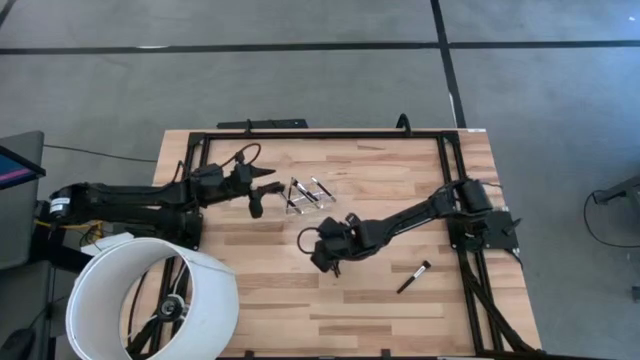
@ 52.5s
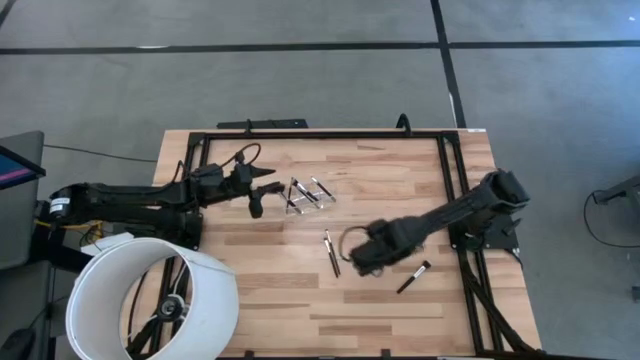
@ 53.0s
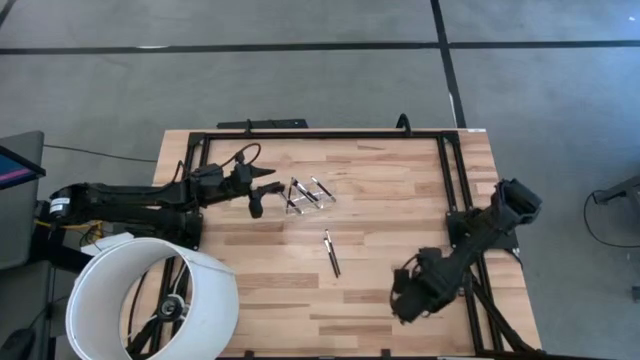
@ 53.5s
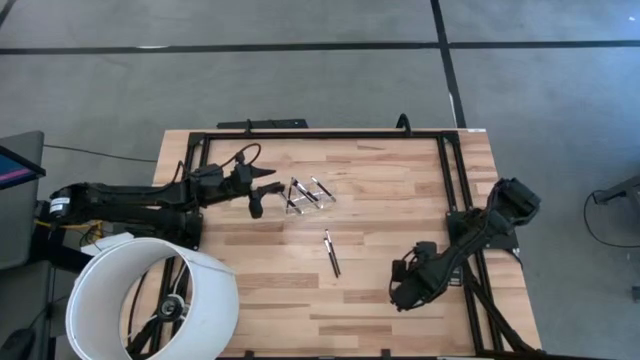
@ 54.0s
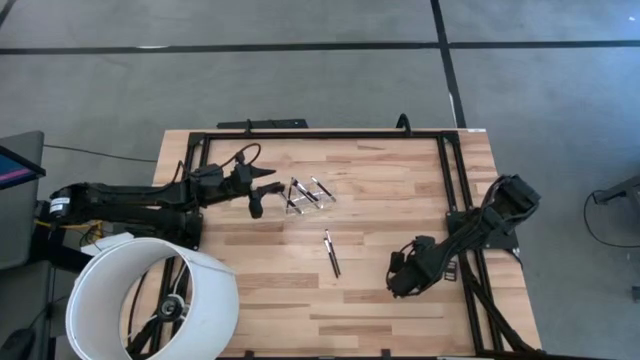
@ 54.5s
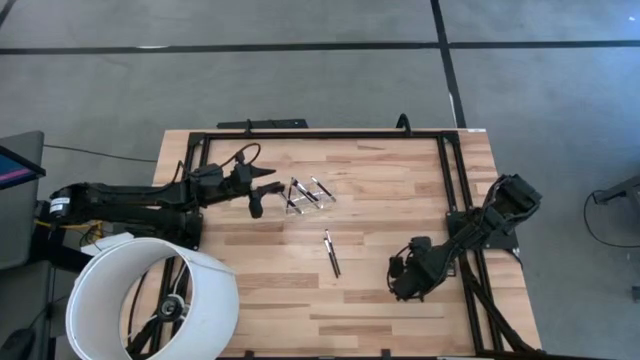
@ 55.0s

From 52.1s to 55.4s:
Task: Put items in baskets/containers
Put the black powder brush into the transparent organizer

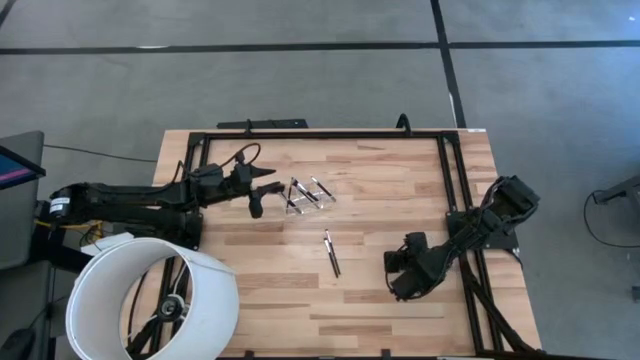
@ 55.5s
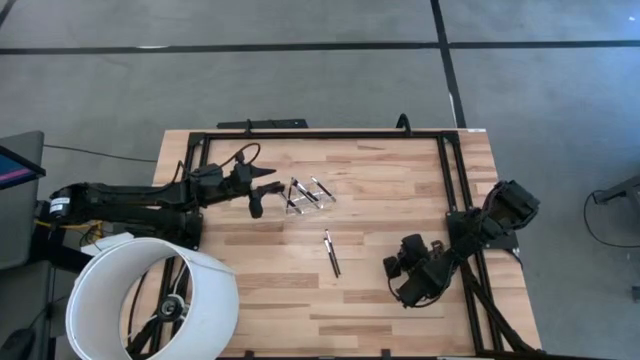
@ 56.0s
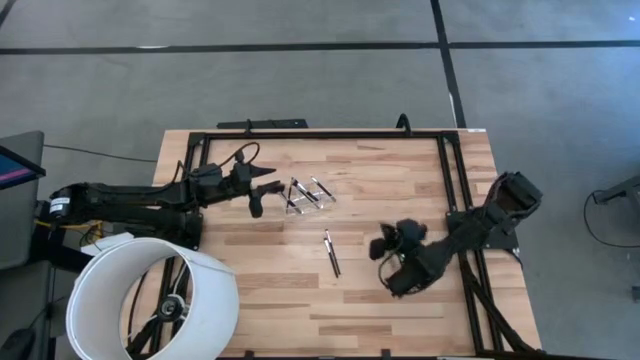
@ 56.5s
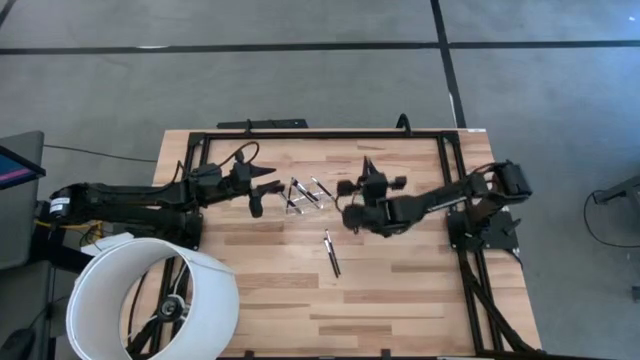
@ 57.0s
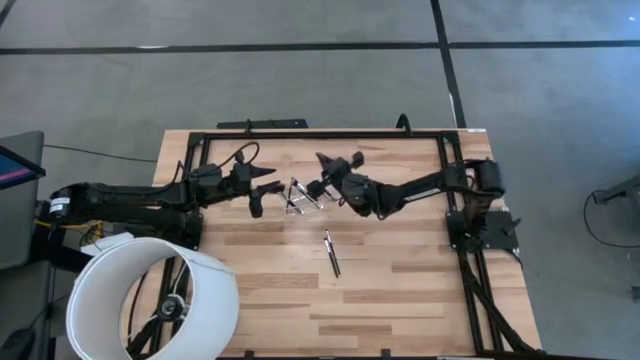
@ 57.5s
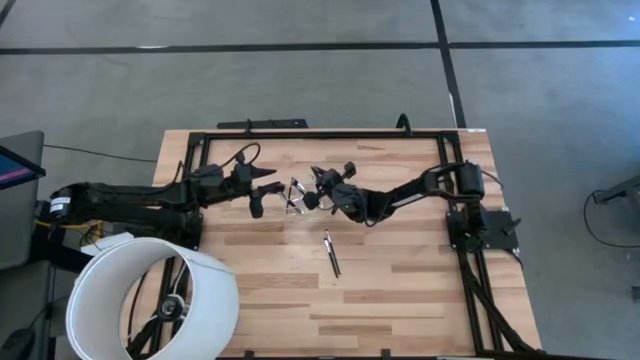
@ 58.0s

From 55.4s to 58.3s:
Put the black powder brush into the transparent organizer

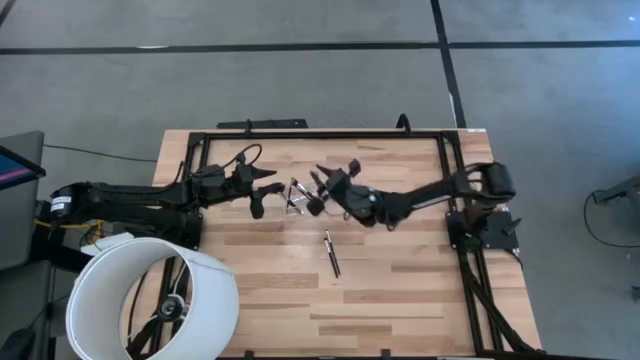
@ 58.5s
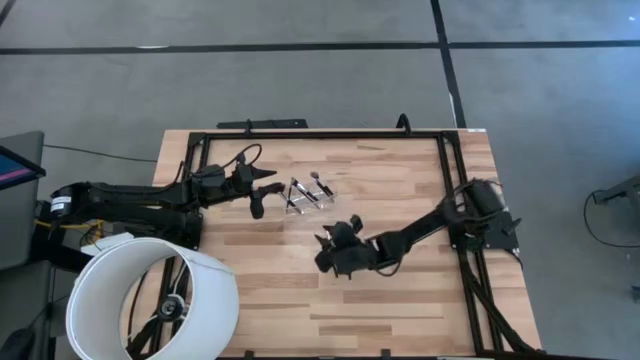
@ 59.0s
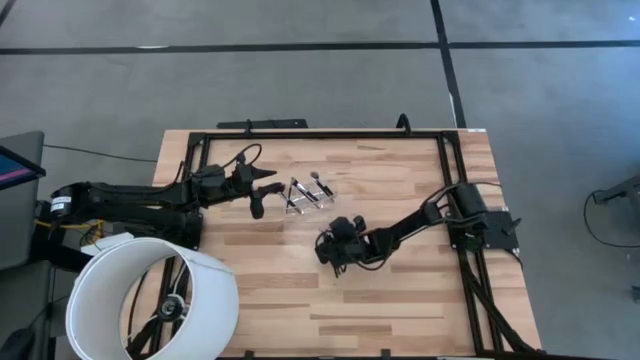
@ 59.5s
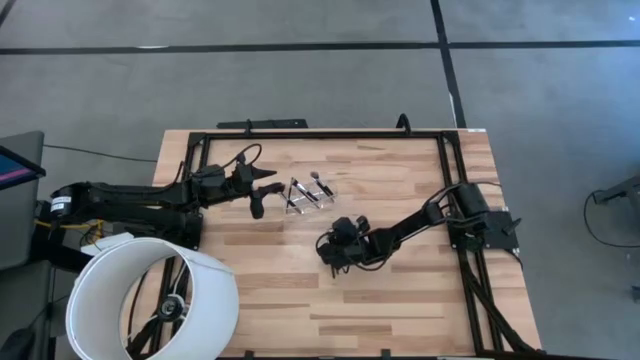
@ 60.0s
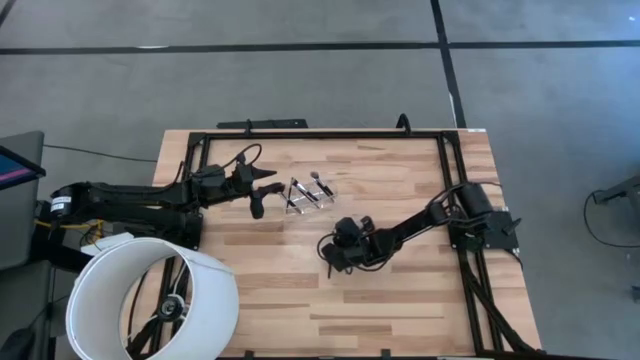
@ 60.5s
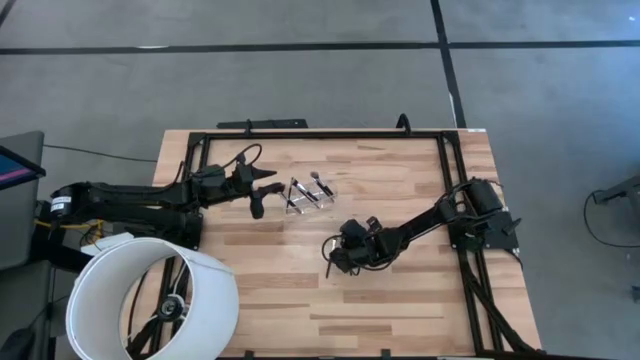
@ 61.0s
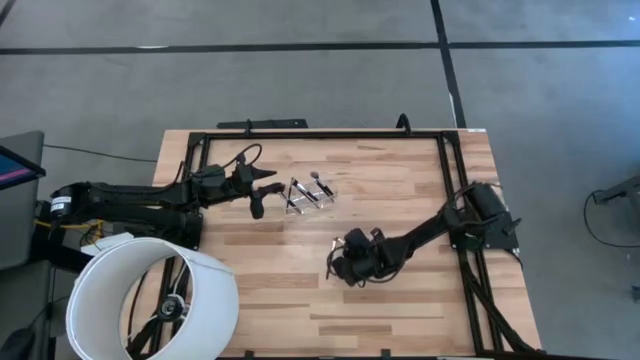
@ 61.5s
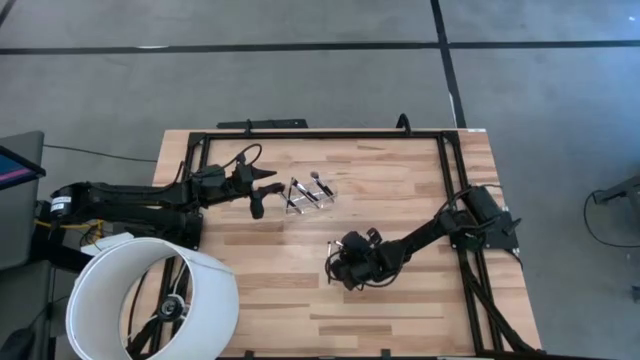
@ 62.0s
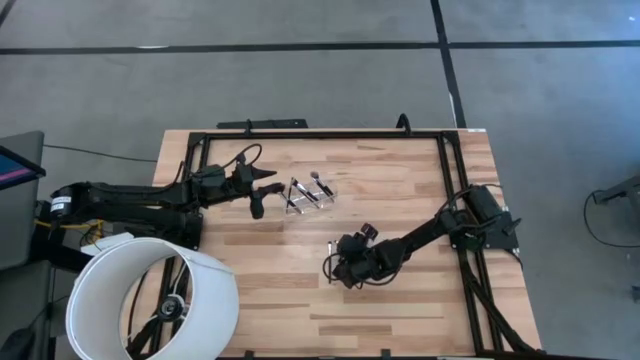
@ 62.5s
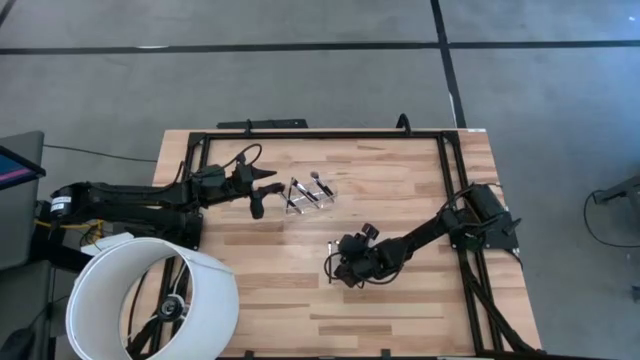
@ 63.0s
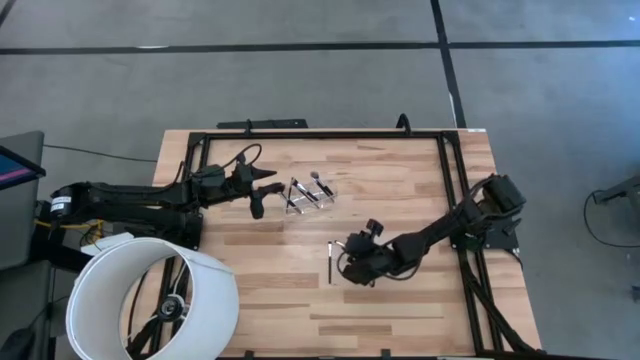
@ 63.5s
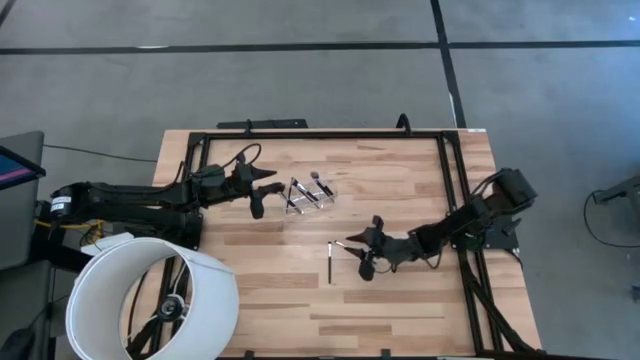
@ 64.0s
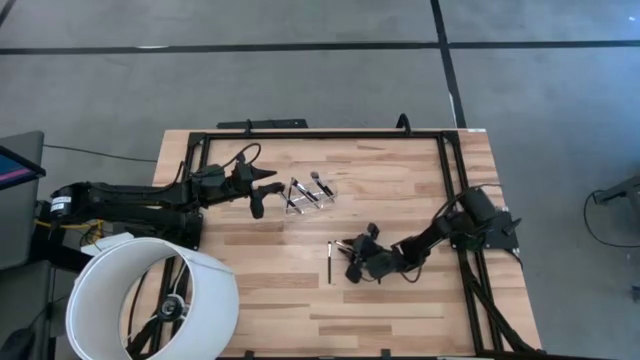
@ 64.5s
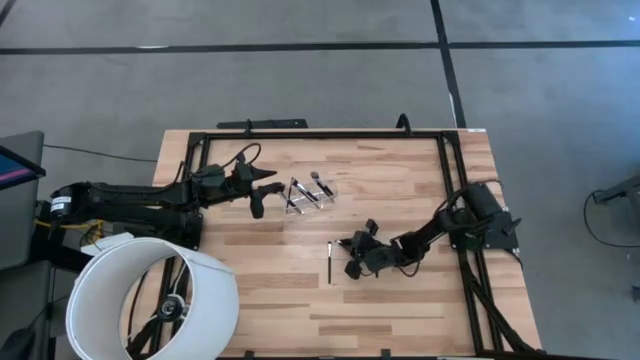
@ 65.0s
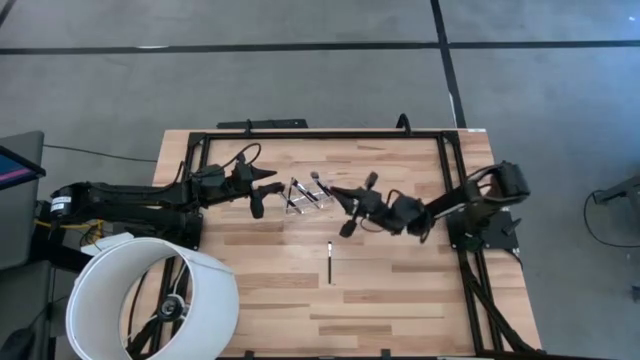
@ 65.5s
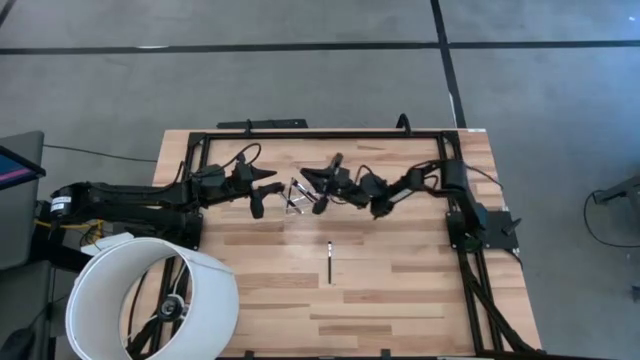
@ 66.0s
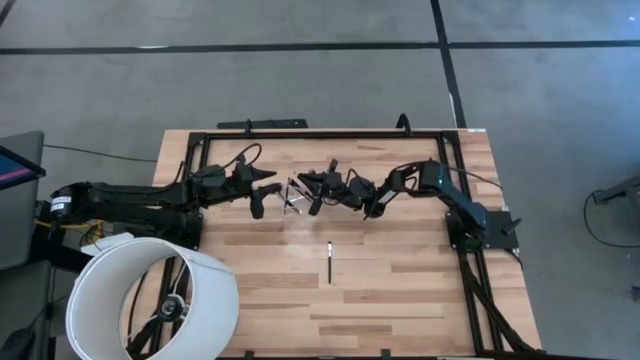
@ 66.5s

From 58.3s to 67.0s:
Put the black eyeshadow brush into the transparent organizer

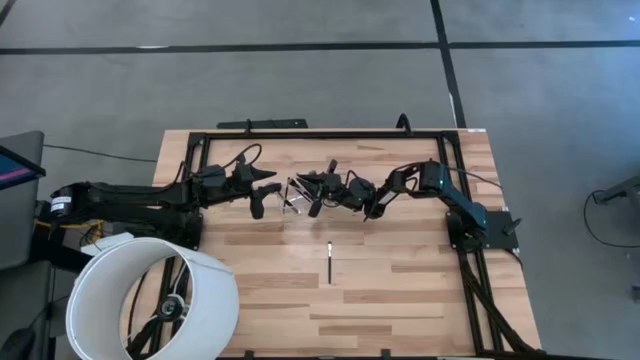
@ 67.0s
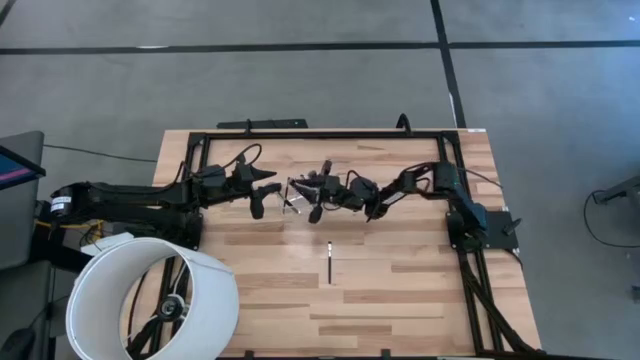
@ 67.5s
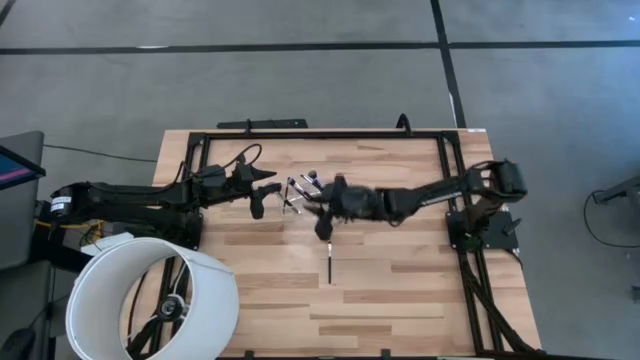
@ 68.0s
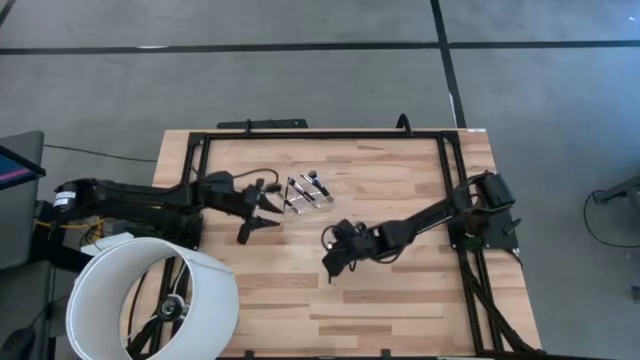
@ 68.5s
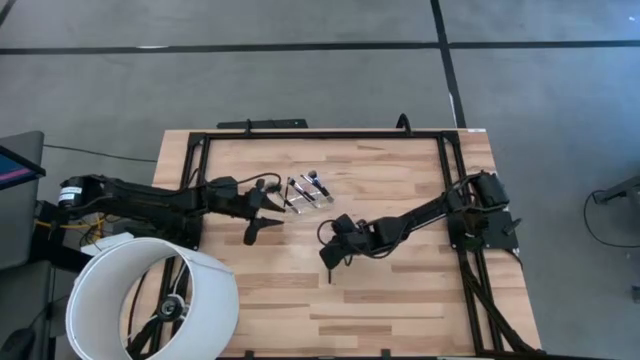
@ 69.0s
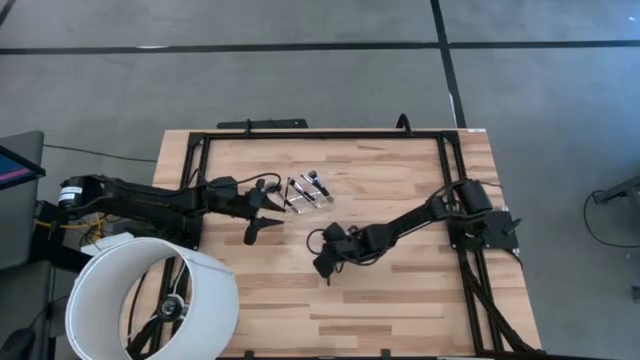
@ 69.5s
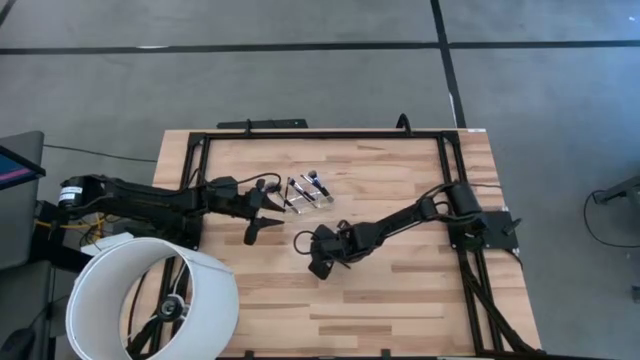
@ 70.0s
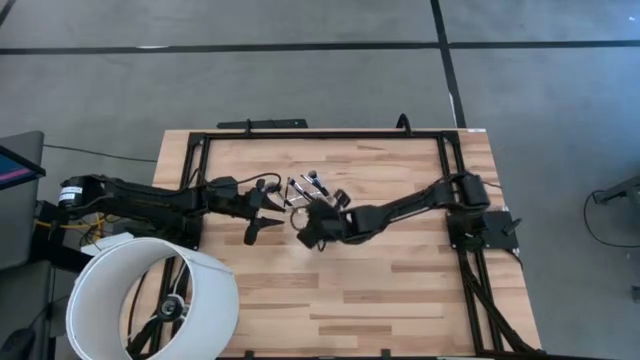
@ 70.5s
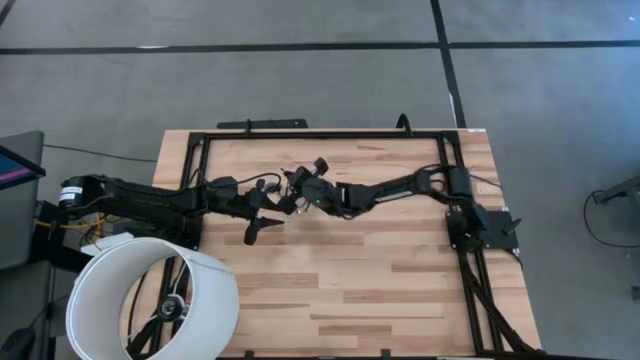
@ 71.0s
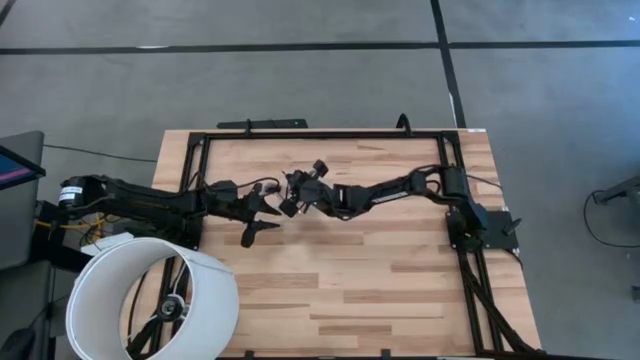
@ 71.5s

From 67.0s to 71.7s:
Put the black eyeshadow brush into the transparent organizer

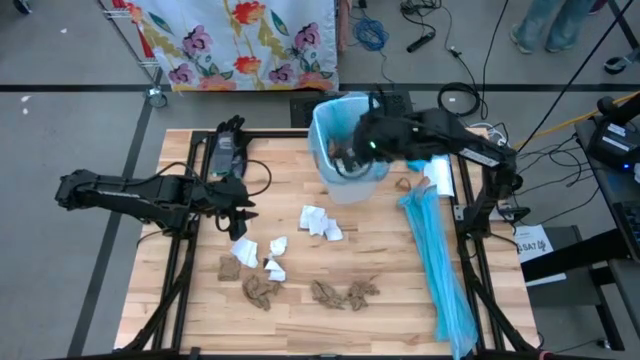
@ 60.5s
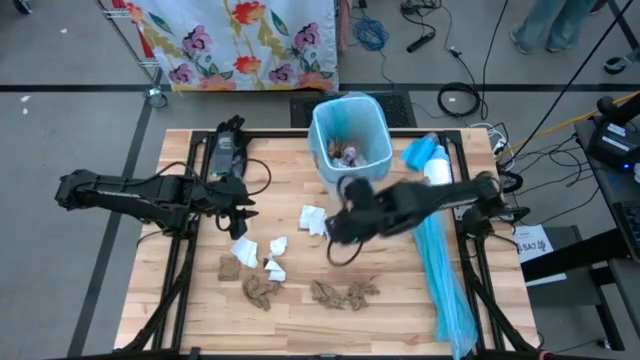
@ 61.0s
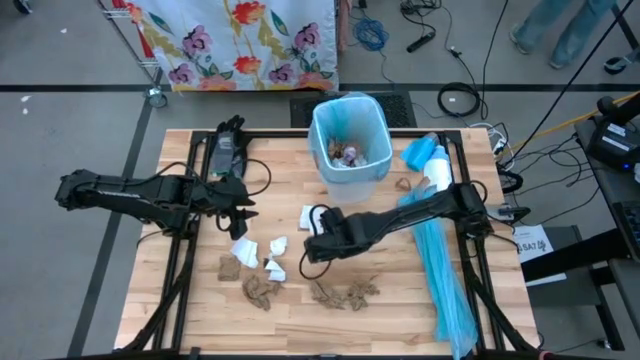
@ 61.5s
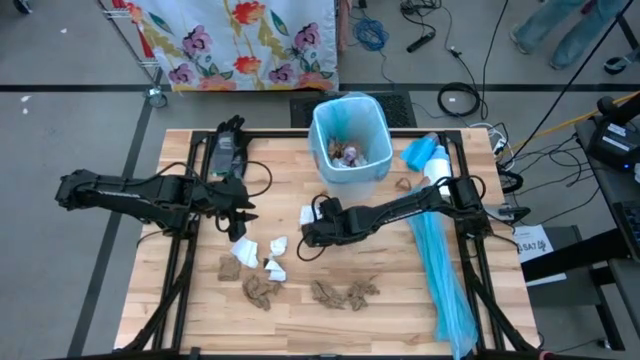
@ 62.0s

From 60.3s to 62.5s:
Task: place trash/remove bag and relplace
Put the piece of magazine into the trash bin
